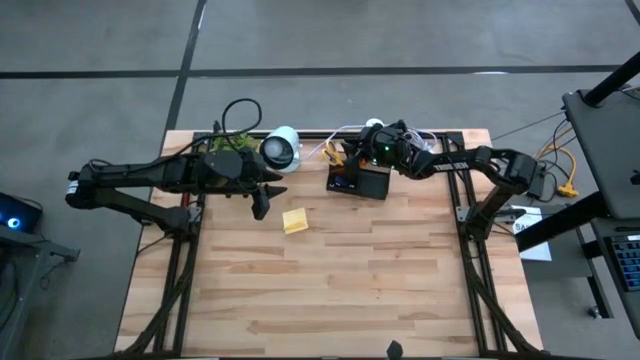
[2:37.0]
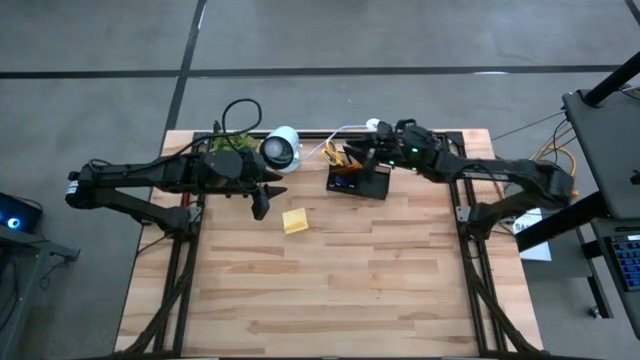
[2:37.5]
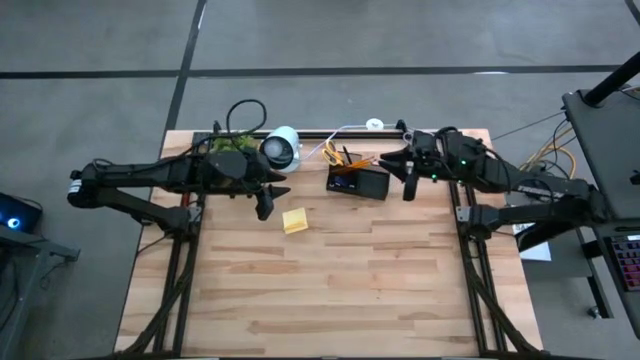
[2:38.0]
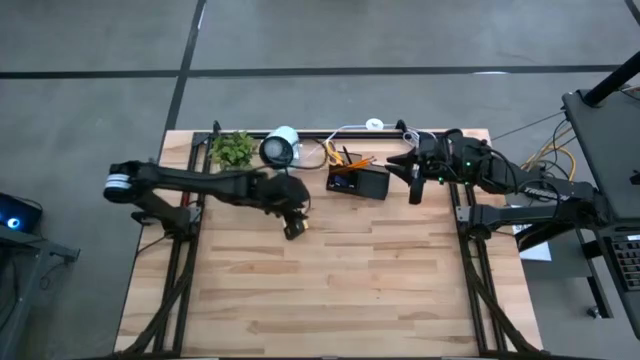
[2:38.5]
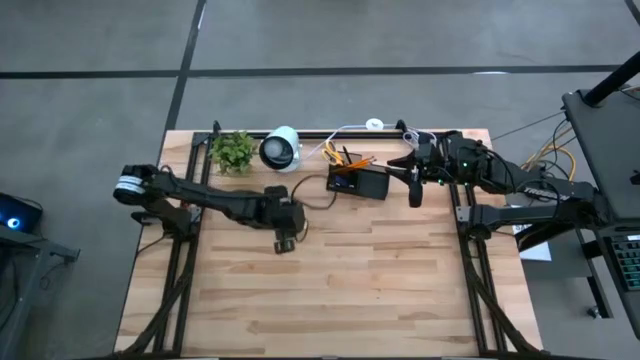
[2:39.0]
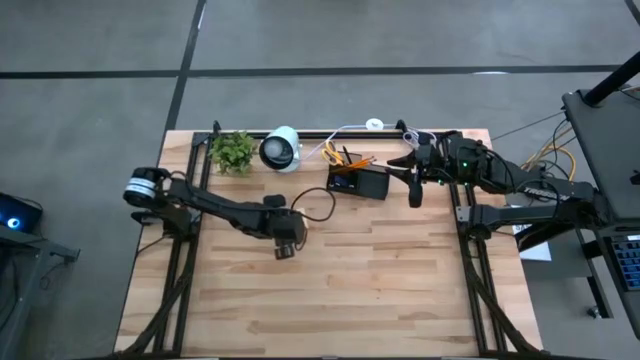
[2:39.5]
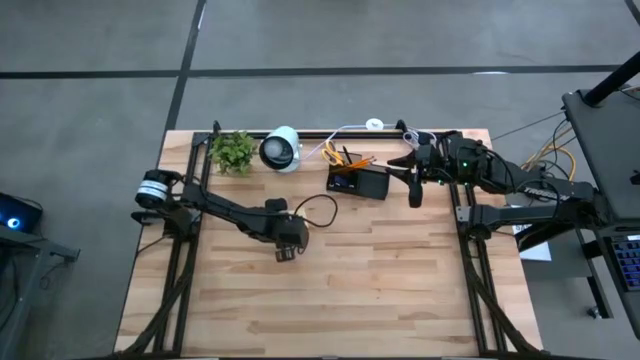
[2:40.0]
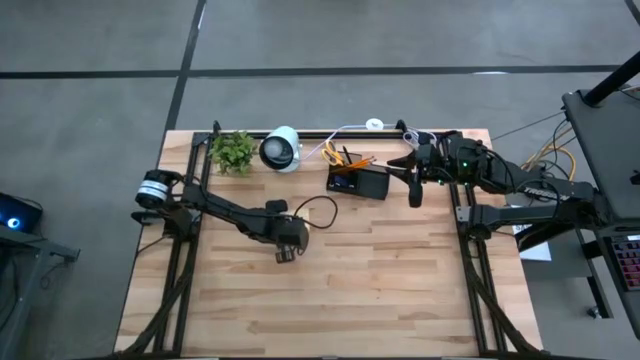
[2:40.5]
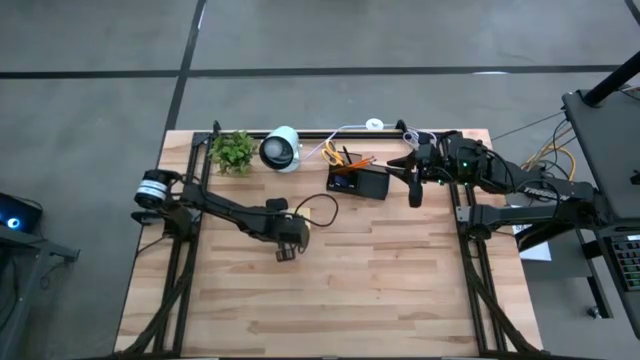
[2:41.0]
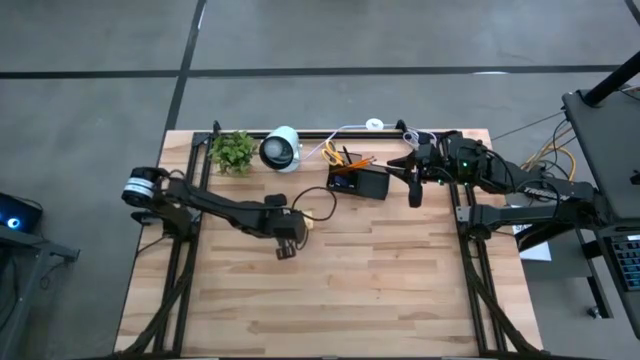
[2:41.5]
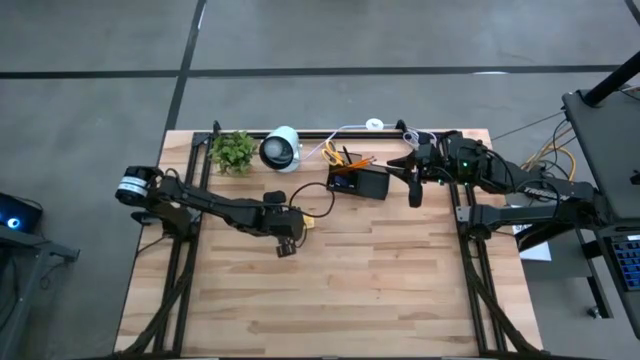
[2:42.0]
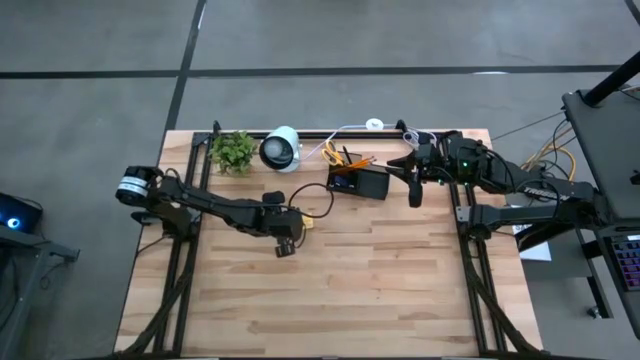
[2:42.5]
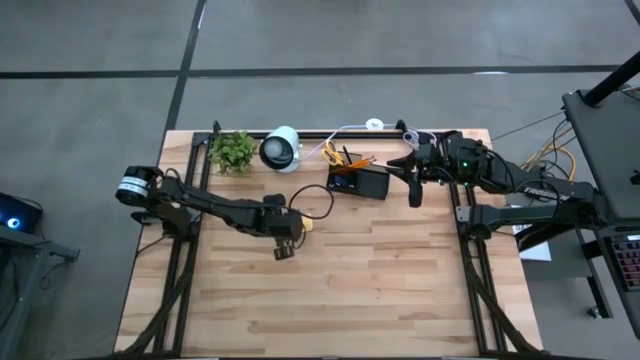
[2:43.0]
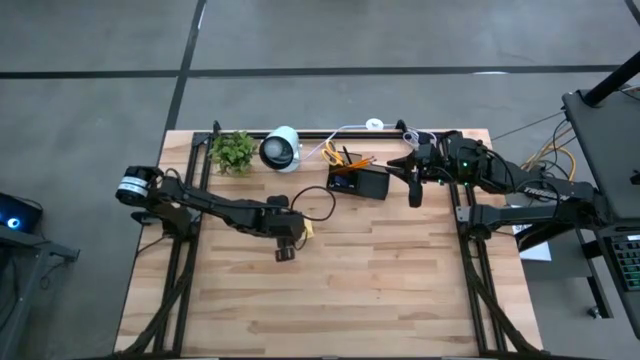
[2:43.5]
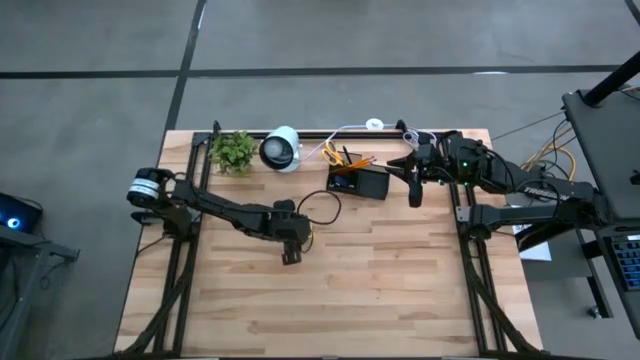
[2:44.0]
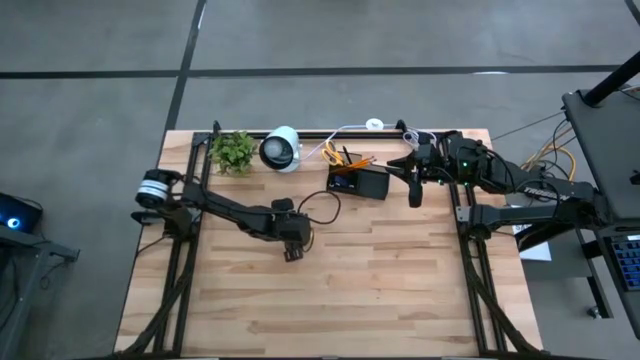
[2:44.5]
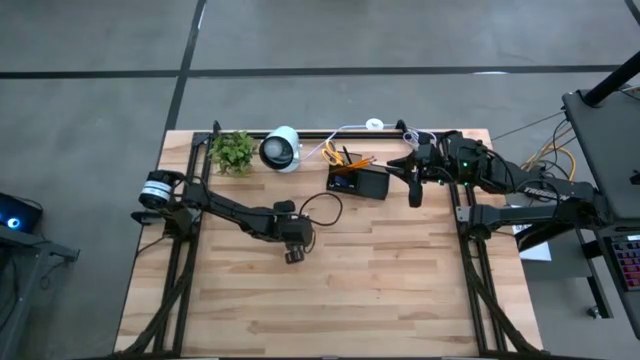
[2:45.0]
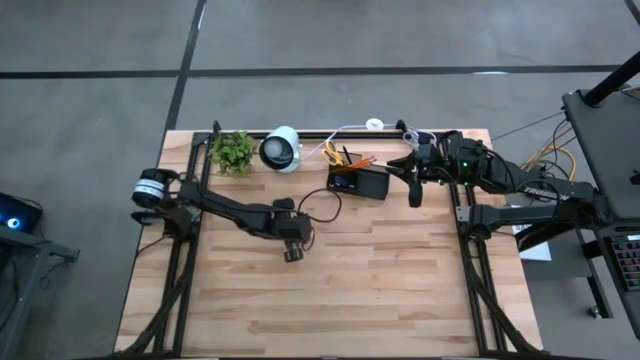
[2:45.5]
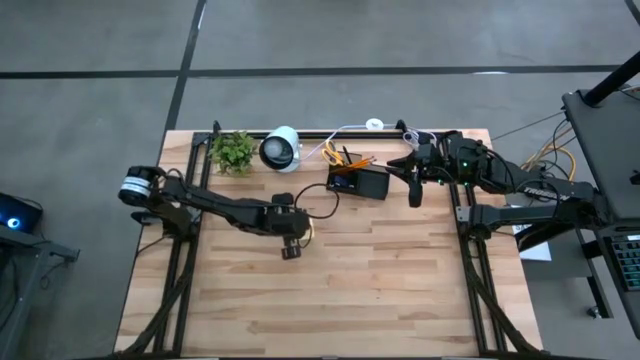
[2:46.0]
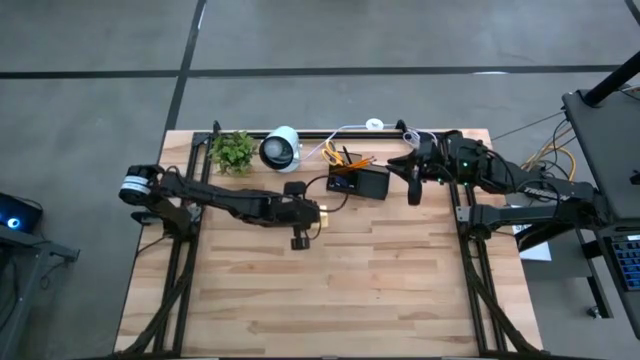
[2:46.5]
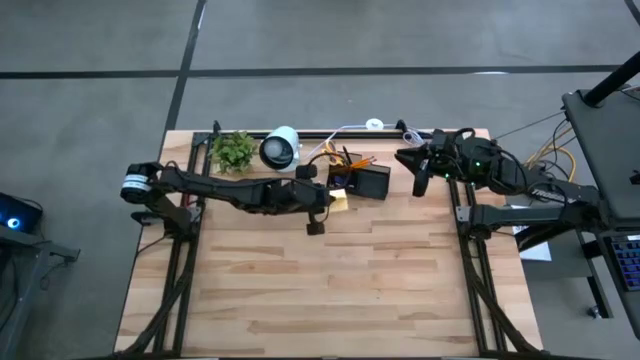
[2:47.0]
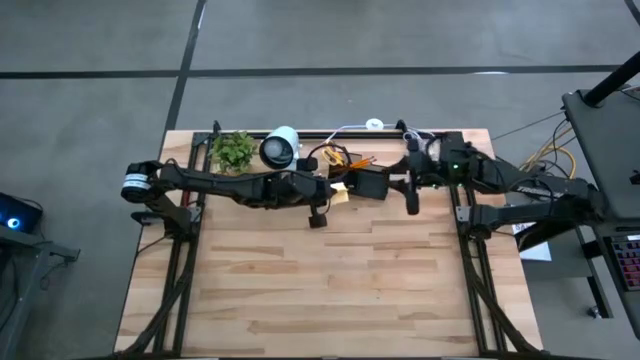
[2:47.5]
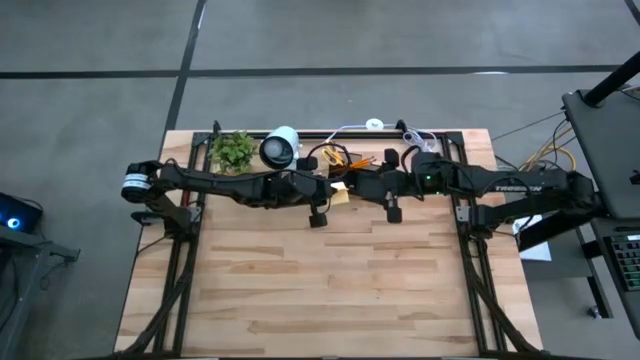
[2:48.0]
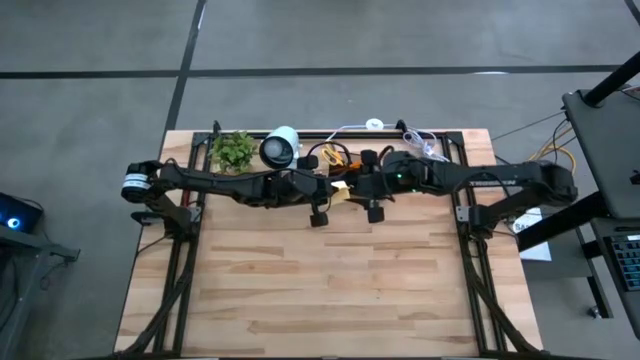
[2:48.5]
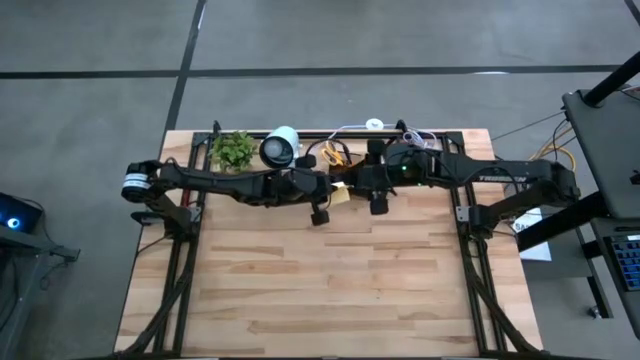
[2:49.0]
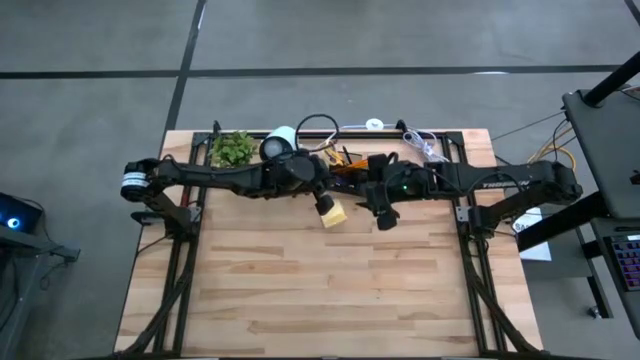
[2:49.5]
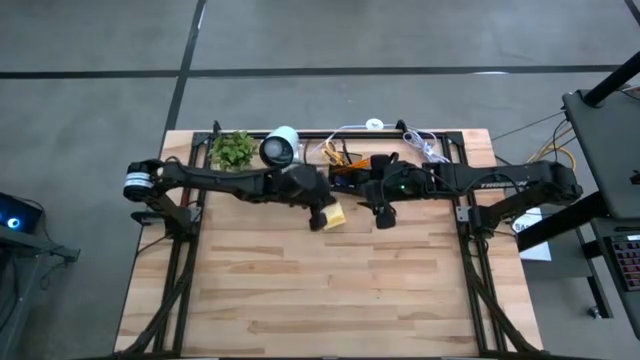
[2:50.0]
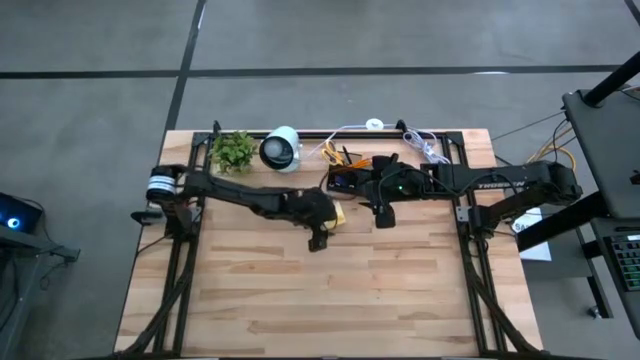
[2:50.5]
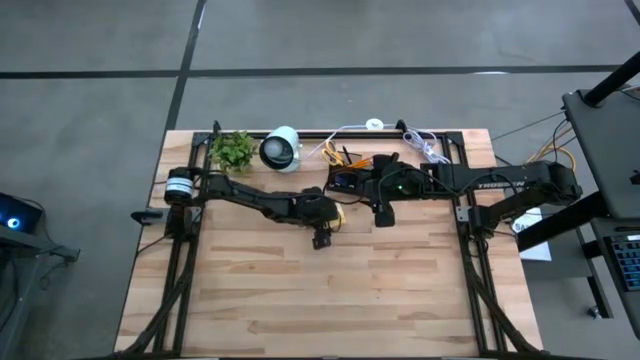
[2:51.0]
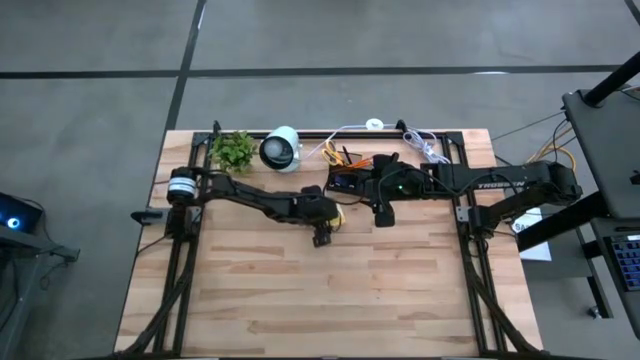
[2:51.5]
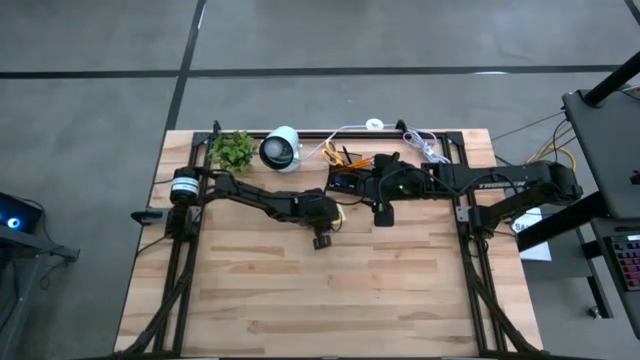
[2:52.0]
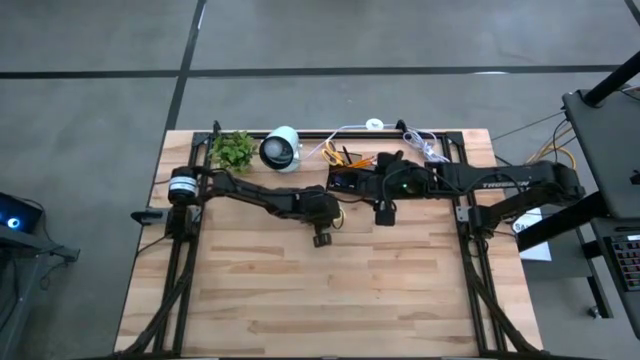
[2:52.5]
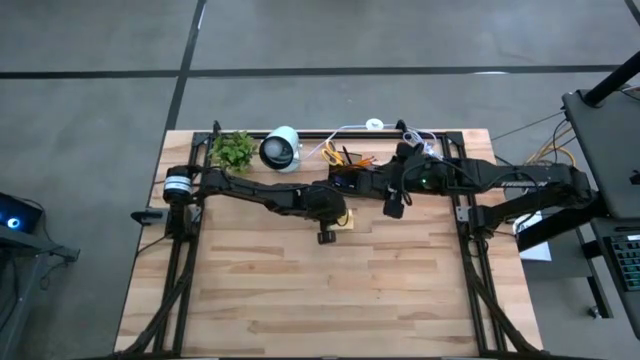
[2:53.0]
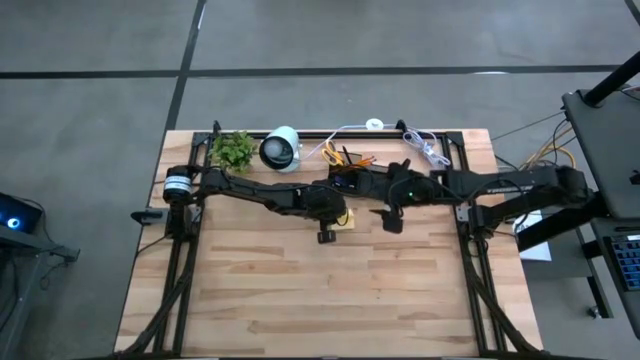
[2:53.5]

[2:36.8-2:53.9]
Task: Pick and place office supplies into organizer
Put the notepad into the desk organizer

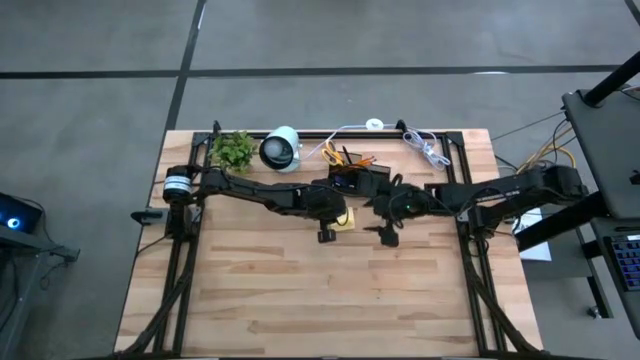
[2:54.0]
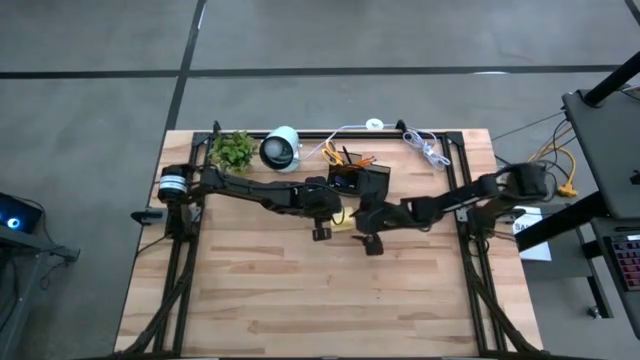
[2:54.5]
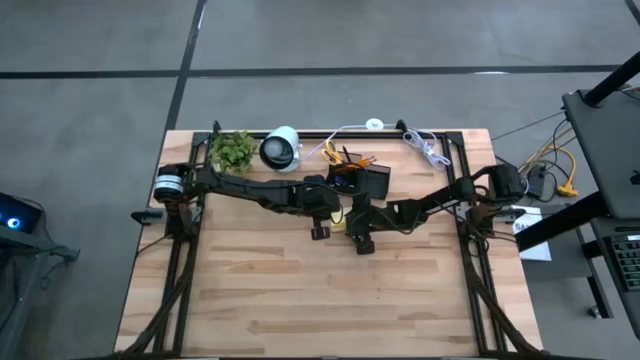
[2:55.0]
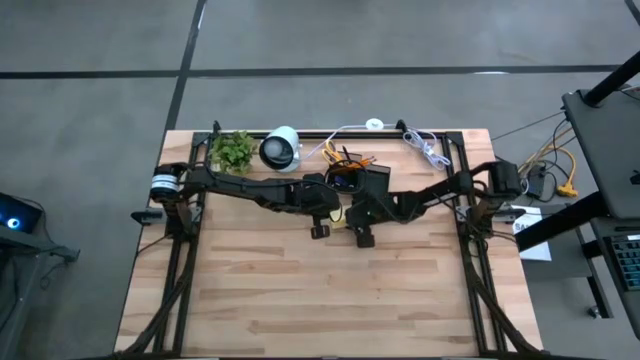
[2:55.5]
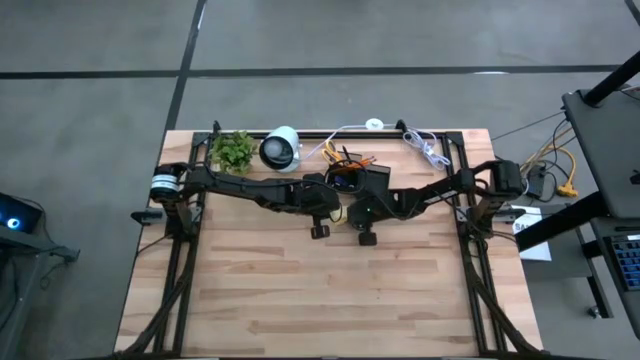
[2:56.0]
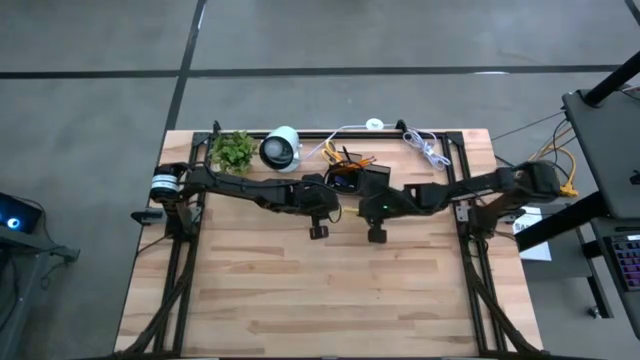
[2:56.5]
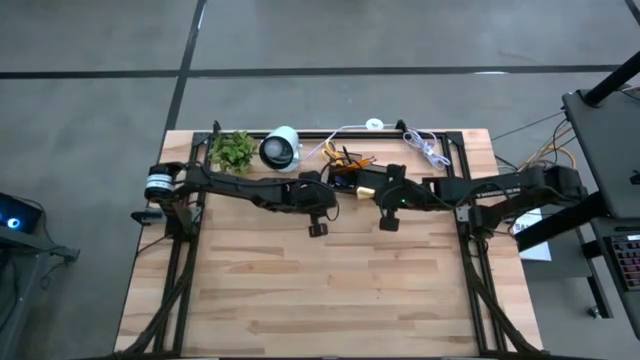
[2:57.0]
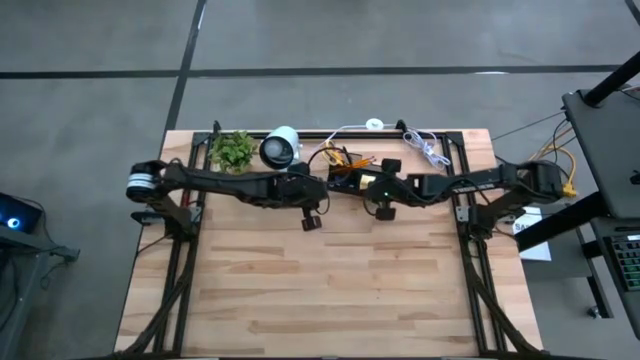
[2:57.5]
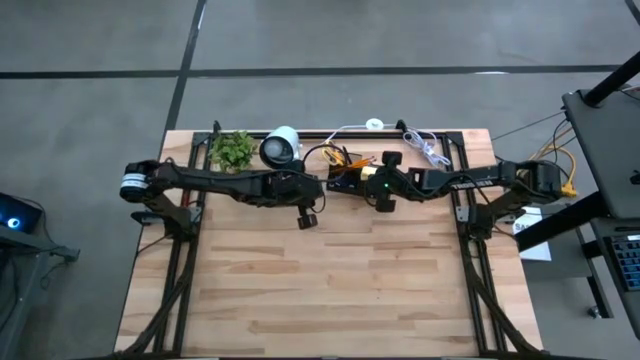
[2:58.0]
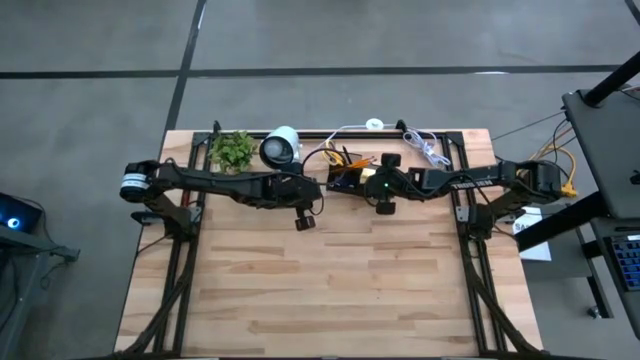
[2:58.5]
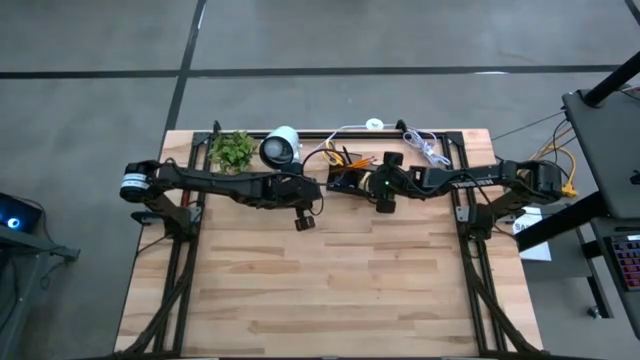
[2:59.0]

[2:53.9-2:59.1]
Put the notepad into the desk organizer
